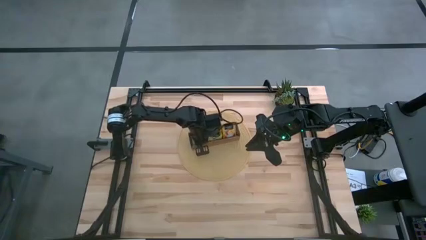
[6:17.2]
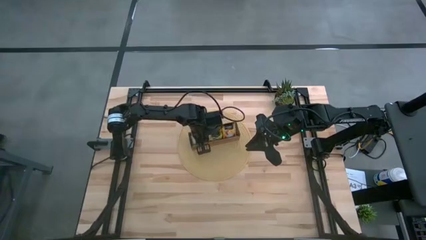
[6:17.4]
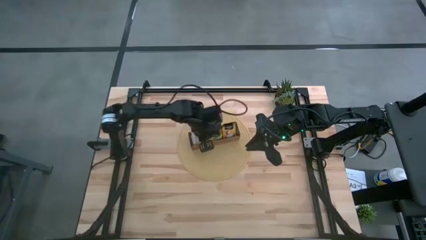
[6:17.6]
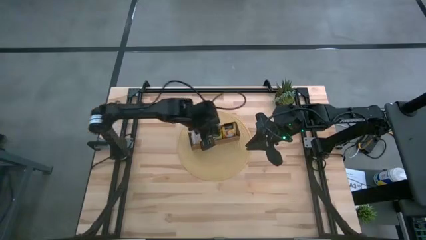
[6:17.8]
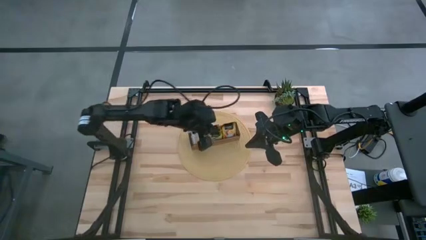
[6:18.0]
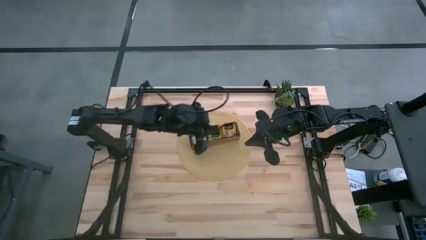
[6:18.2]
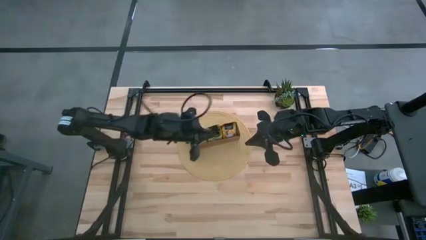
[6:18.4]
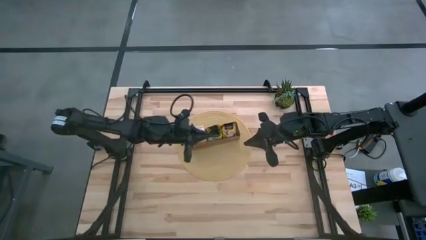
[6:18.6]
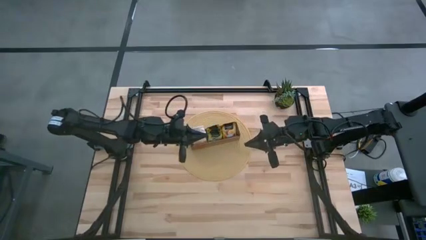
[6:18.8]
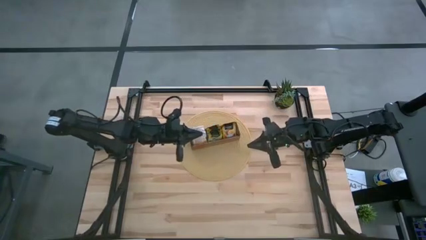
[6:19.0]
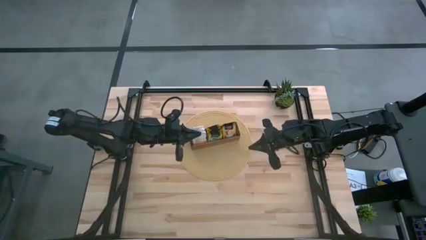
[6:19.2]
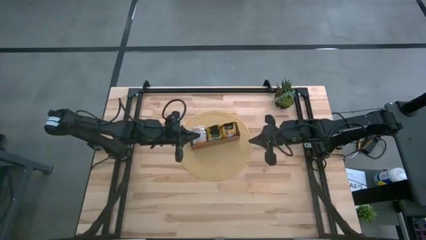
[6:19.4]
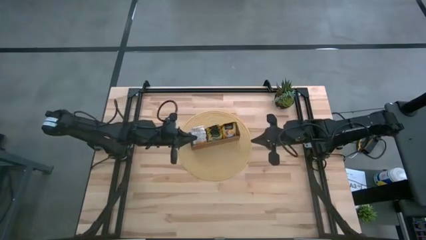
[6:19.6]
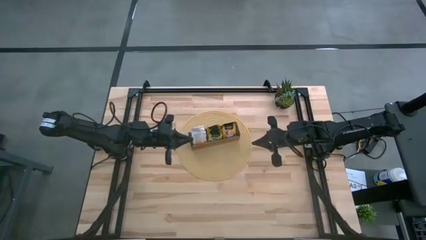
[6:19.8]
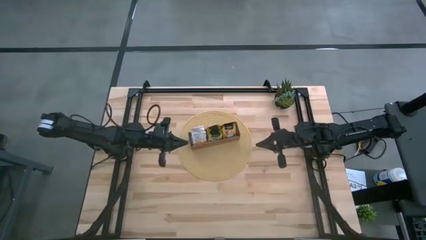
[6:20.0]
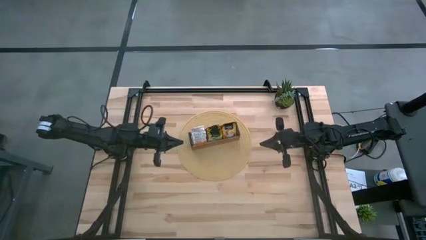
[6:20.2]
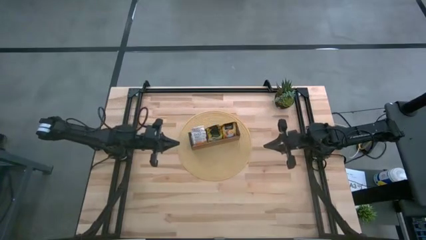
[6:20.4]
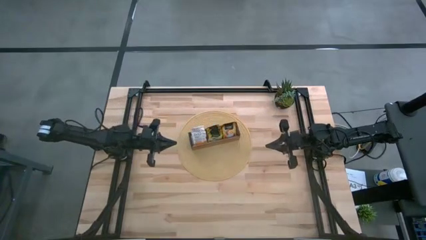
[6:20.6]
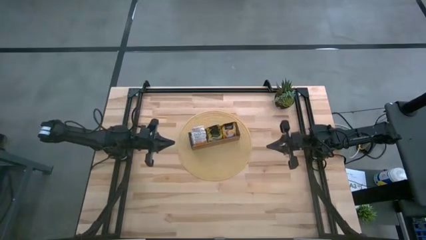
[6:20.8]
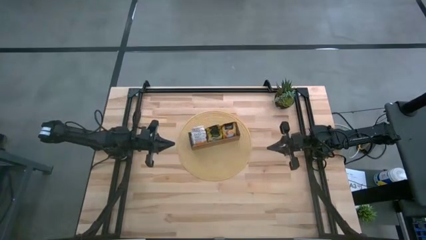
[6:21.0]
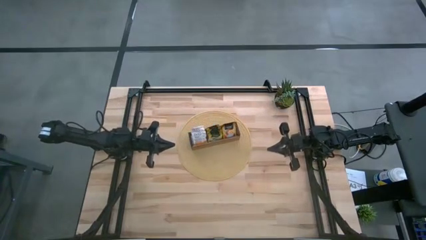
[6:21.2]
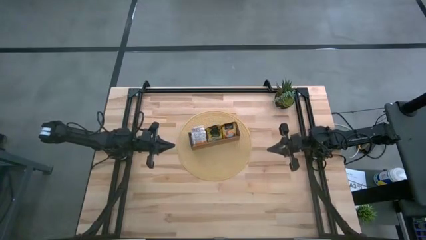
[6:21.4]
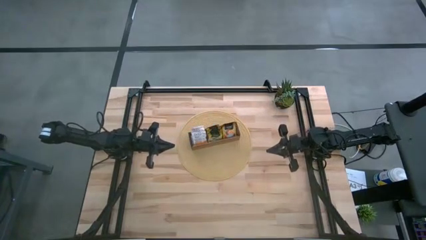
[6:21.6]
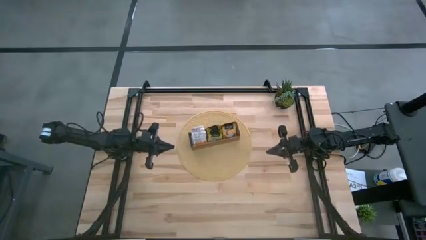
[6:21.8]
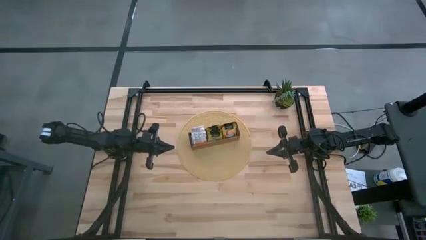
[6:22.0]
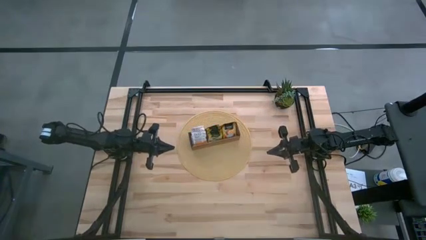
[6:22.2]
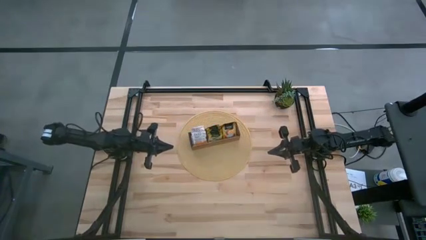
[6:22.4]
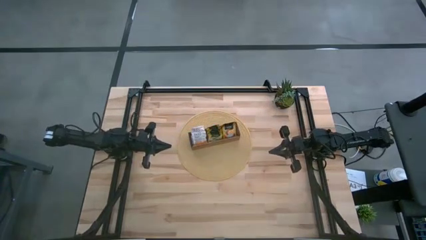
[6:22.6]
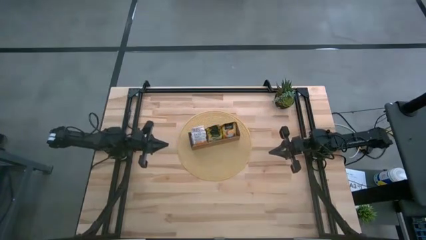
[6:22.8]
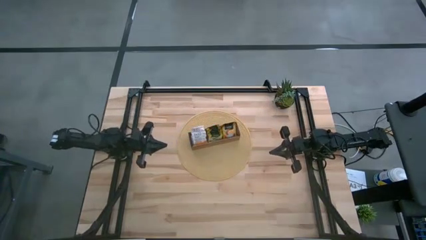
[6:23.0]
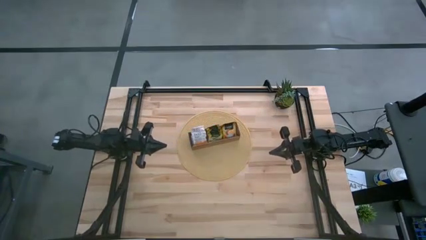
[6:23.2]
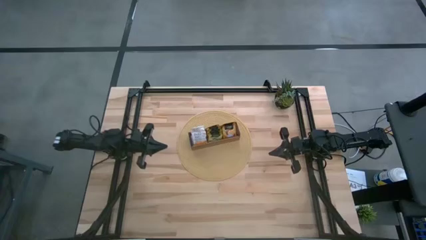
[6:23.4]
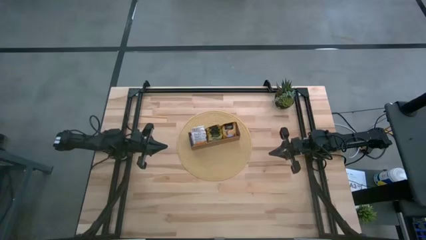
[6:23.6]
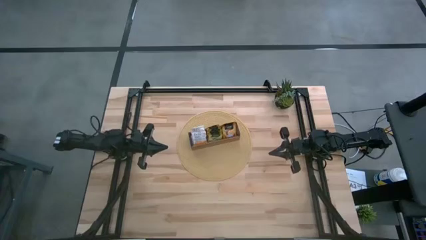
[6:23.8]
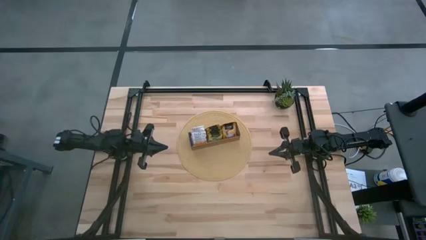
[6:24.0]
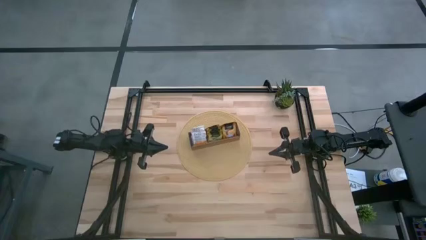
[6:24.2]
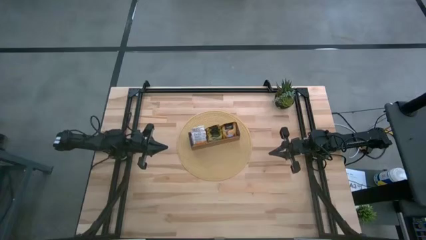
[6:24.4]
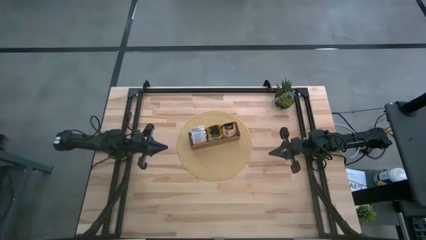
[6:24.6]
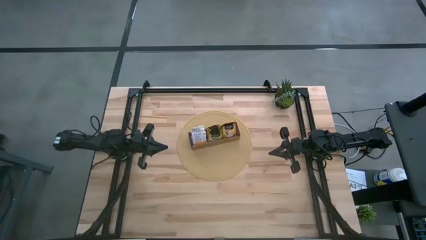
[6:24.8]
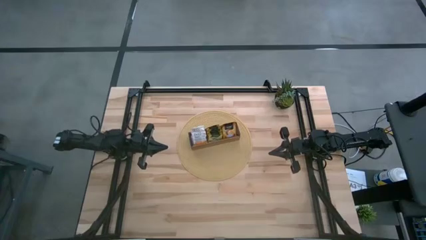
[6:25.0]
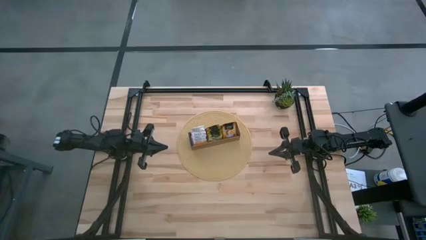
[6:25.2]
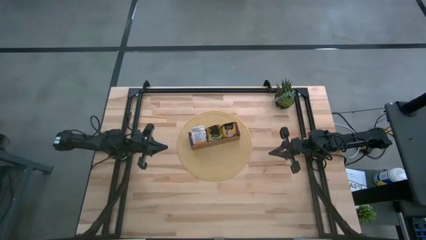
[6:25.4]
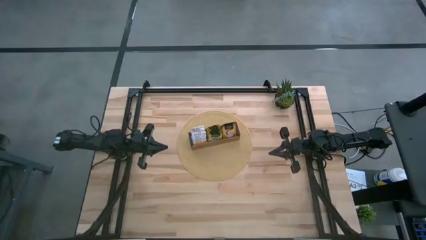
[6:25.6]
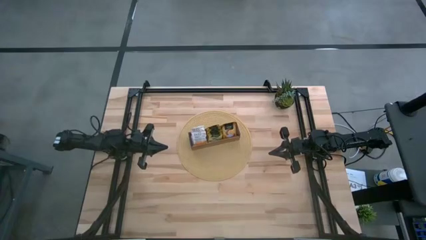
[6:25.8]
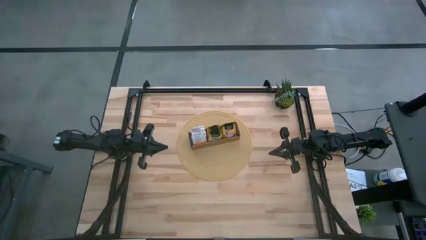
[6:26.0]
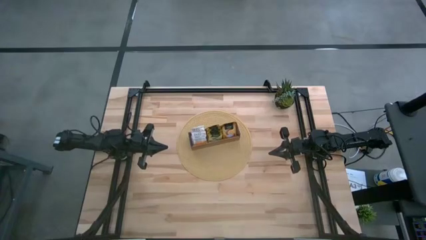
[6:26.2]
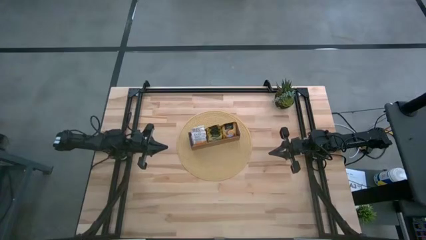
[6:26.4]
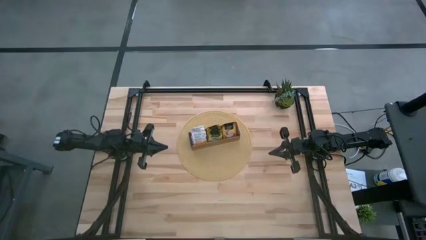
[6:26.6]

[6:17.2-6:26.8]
Task: Pick & Place Tea
Return to Home Position

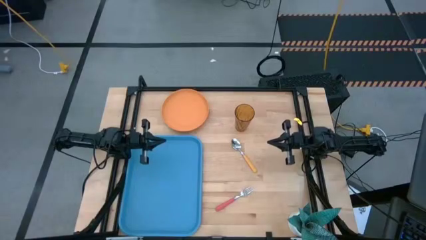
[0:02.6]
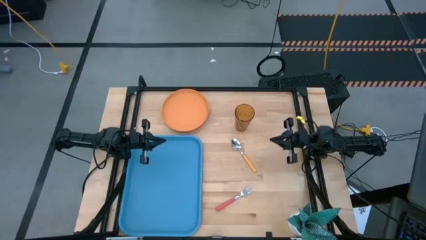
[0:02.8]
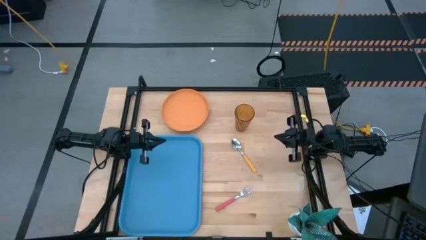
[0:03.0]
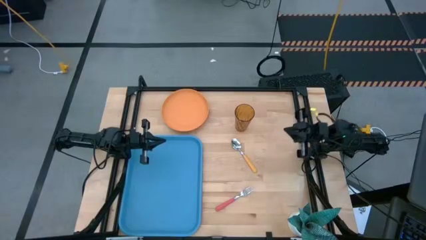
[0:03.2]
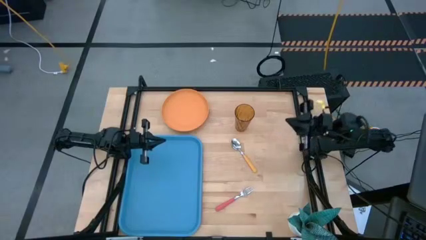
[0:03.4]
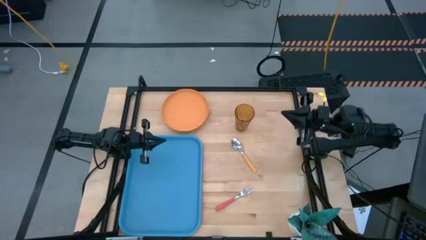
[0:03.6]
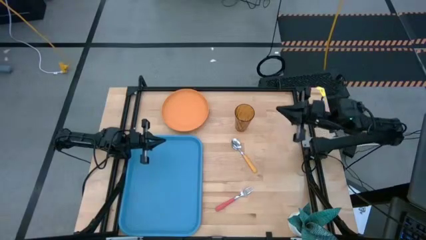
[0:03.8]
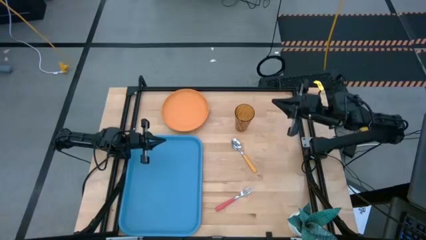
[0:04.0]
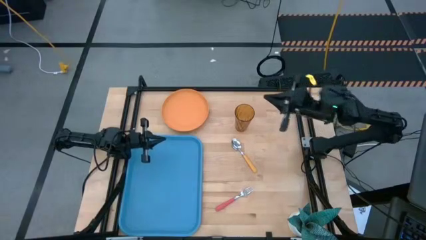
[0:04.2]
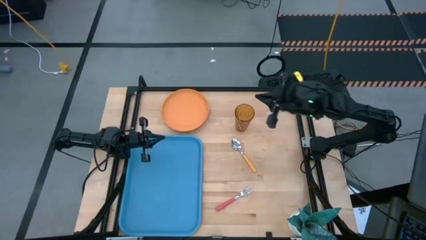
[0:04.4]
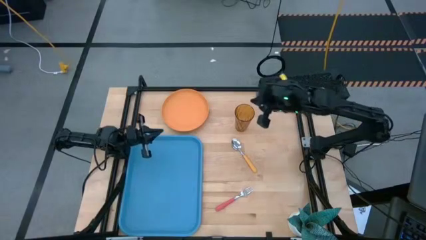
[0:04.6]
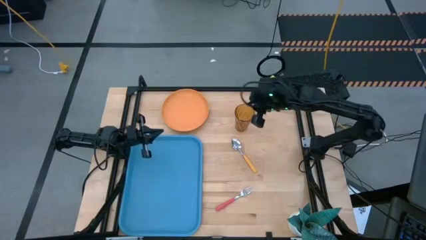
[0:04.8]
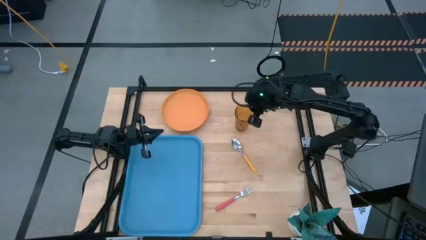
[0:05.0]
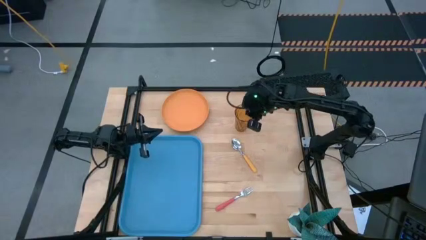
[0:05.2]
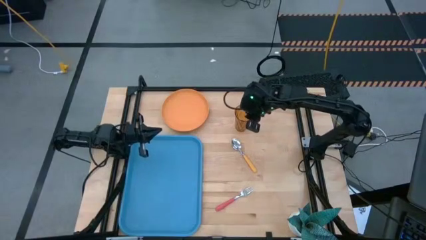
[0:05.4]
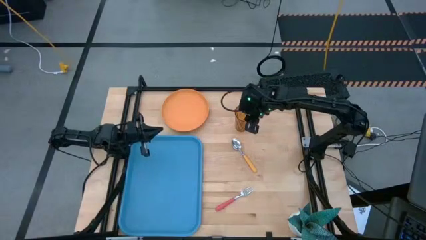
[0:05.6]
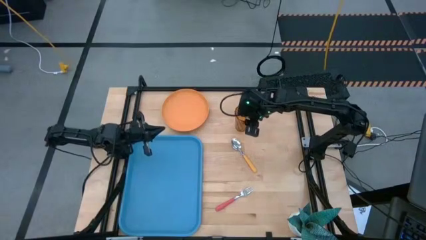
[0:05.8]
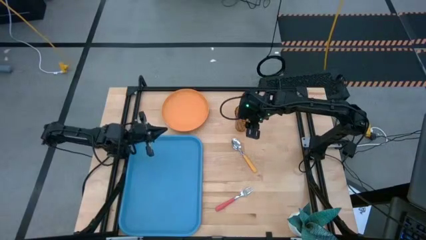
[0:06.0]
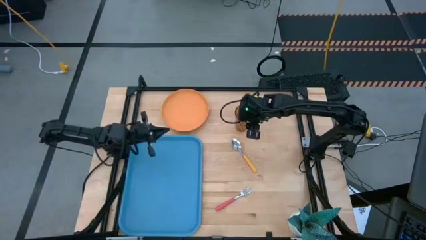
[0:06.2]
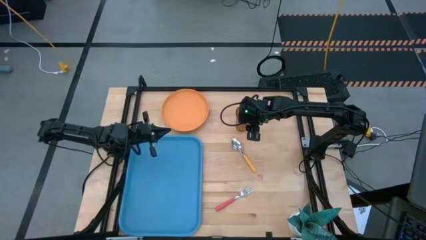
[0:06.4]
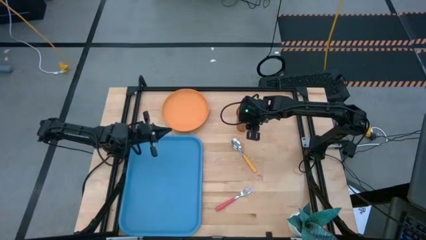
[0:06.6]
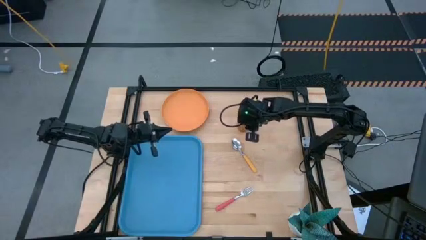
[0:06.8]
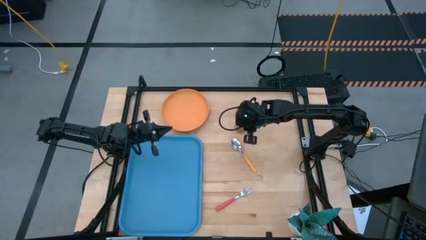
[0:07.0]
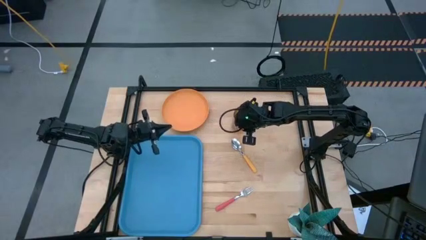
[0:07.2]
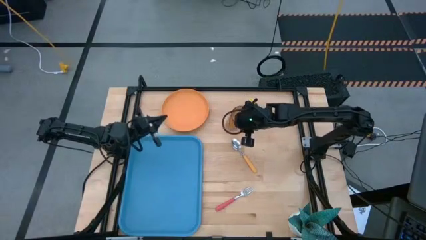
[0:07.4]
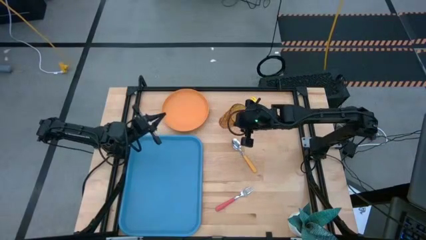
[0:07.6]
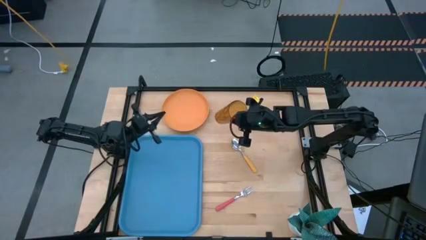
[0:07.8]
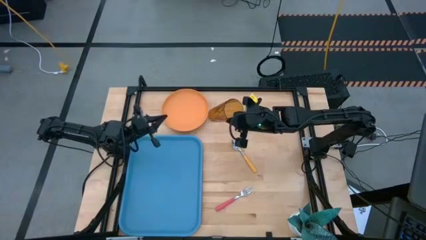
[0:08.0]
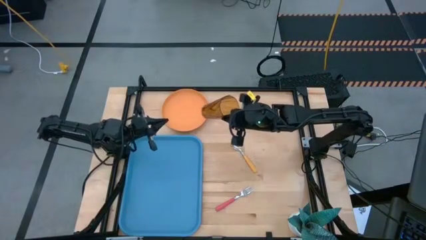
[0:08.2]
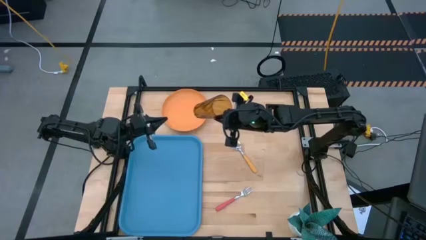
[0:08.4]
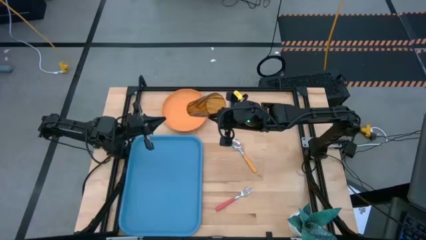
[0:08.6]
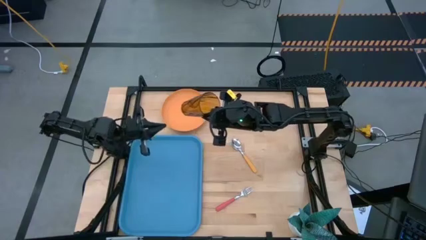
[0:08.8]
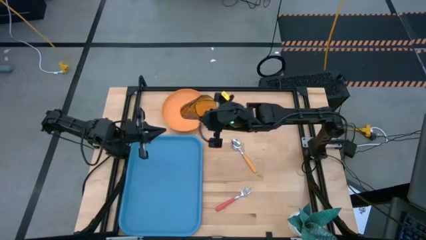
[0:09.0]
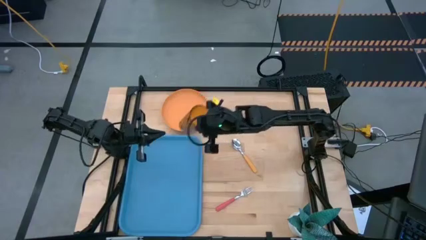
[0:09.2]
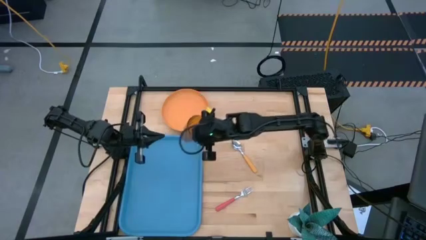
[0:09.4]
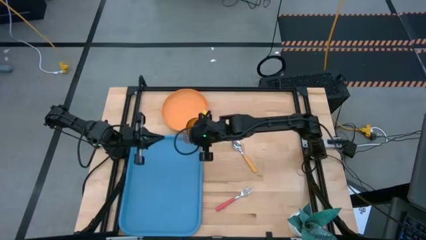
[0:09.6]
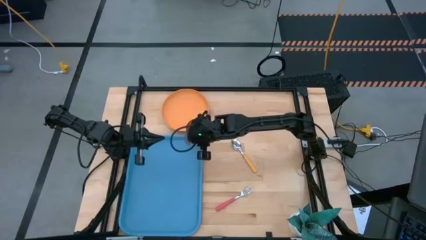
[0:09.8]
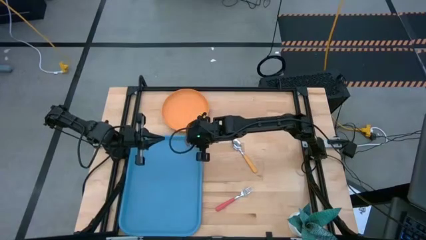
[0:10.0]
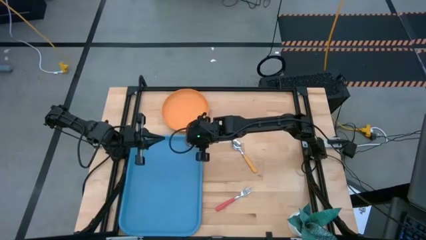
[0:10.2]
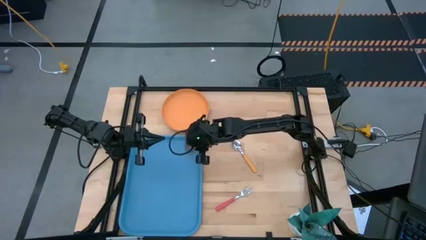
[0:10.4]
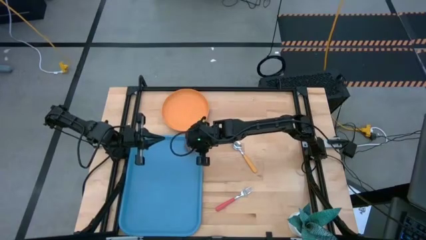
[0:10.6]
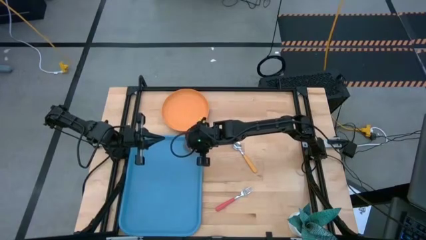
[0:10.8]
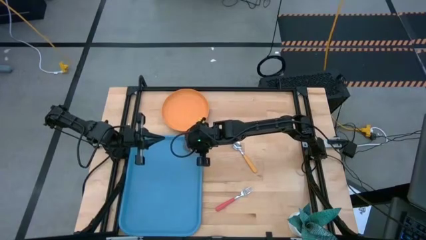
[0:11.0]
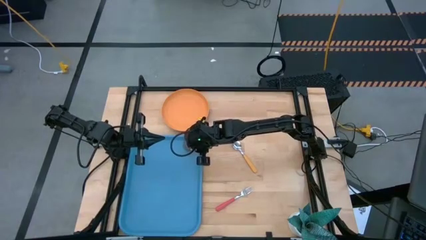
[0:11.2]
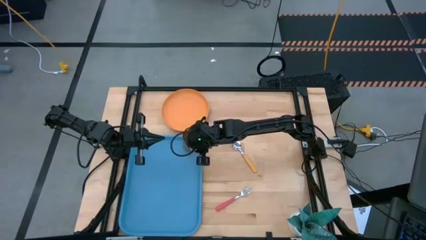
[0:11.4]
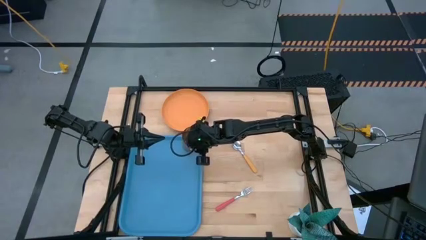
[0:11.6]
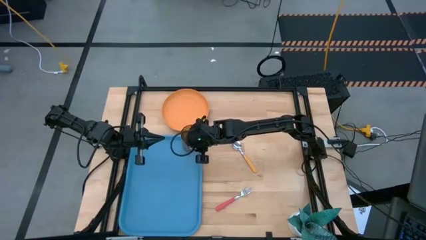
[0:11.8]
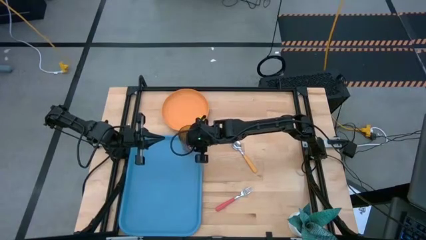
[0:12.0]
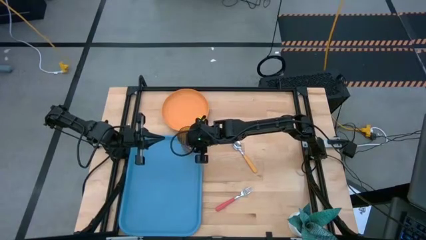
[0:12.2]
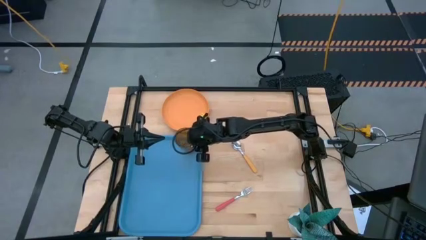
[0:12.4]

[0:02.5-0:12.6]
Task: Pick and place plate/cup/fork/spoon on tray
Put the brown cup on the blue tray
